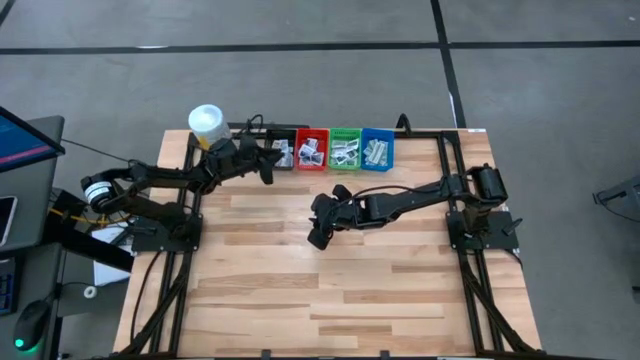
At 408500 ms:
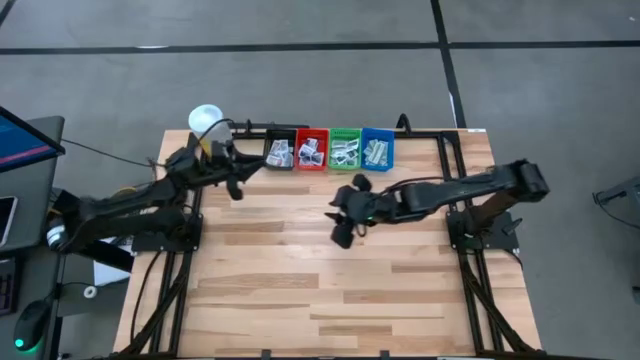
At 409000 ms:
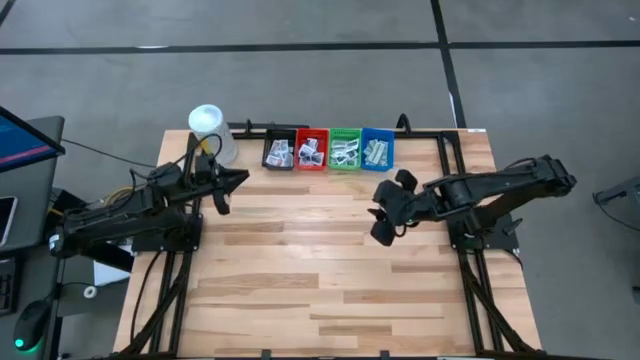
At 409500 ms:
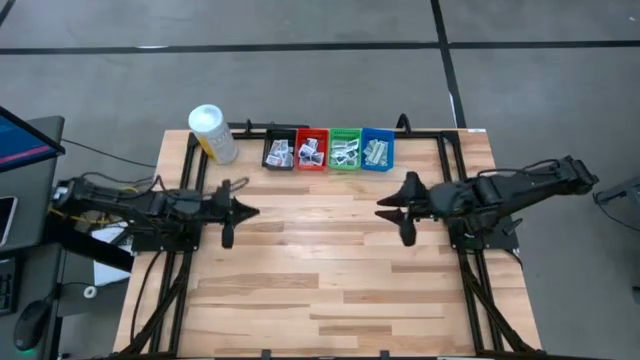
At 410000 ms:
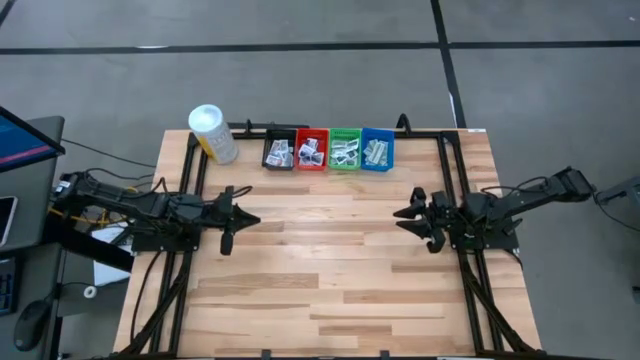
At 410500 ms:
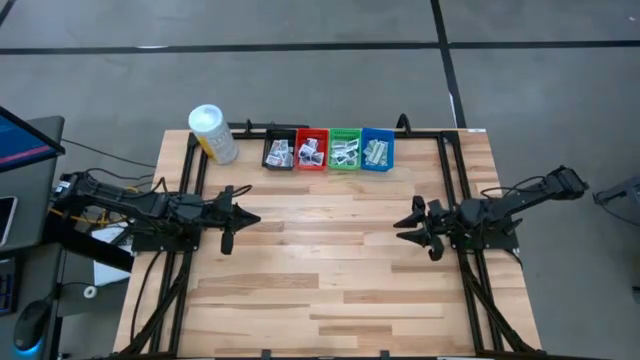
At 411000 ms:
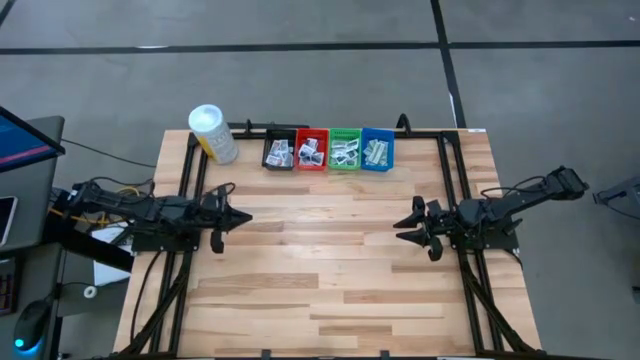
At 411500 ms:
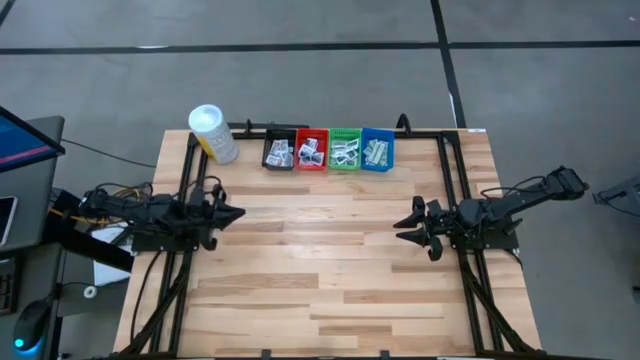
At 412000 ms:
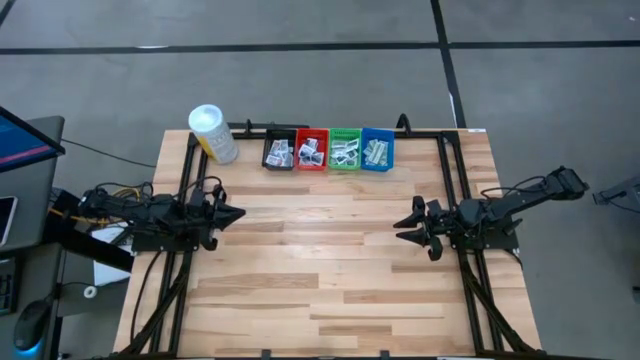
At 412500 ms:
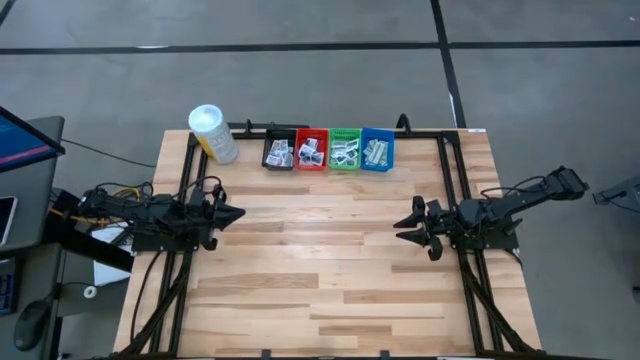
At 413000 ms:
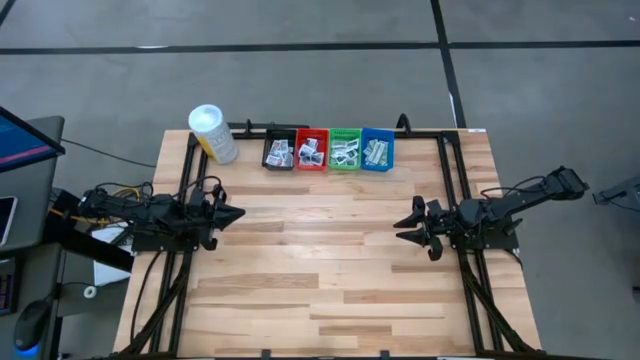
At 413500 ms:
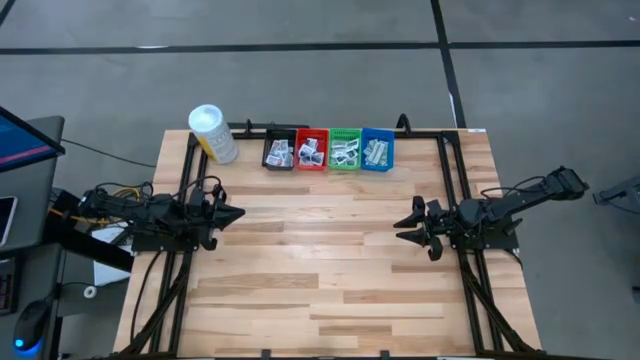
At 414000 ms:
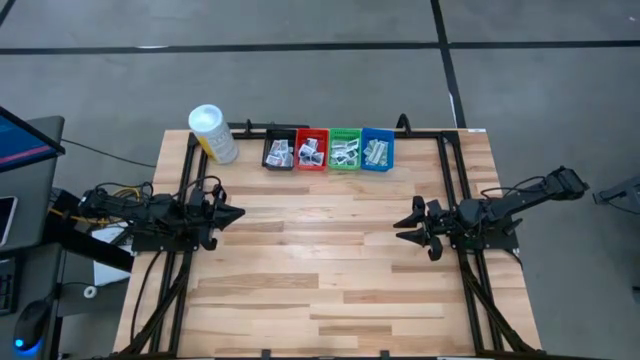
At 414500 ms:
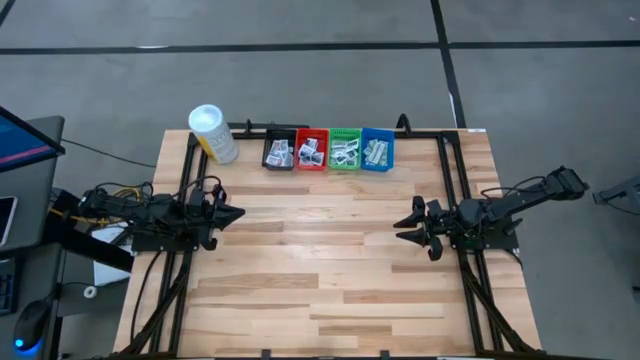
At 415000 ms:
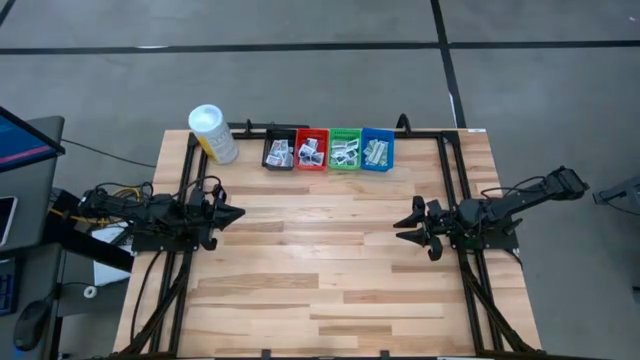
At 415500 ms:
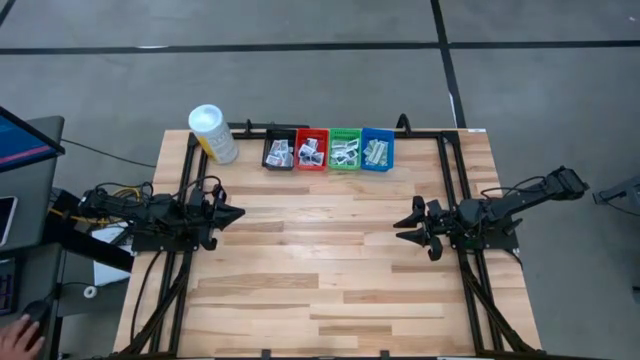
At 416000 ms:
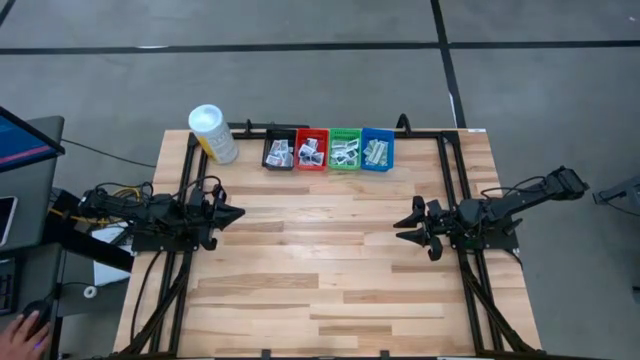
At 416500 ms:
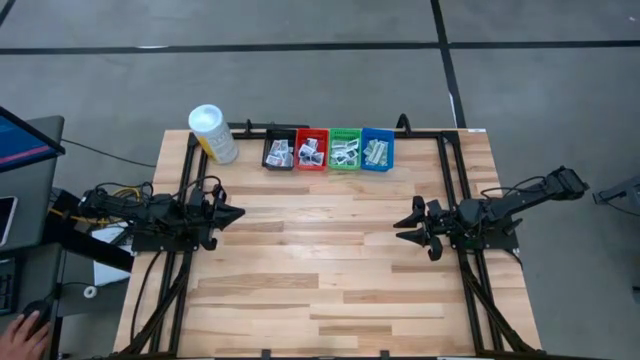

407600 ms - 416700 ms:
Task: Pick & Place First Aid Supplies
Return to Home Position

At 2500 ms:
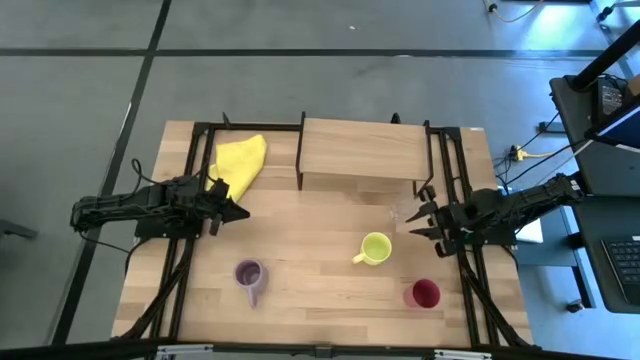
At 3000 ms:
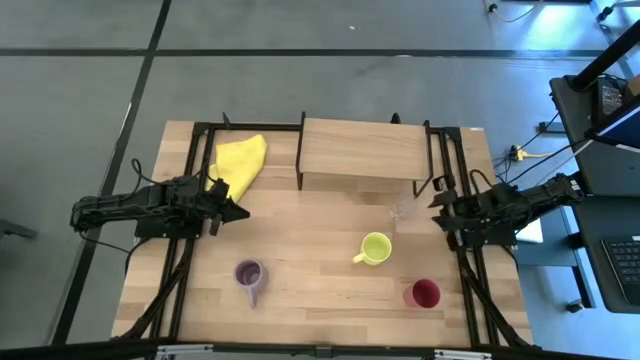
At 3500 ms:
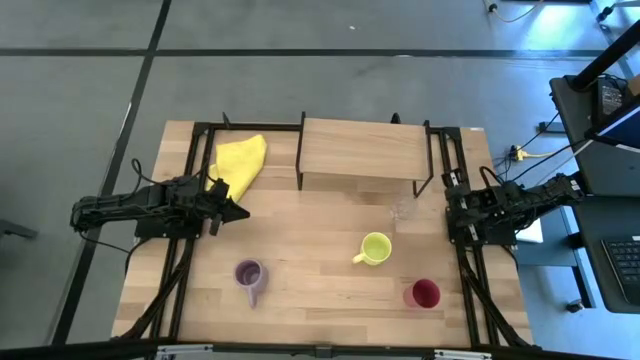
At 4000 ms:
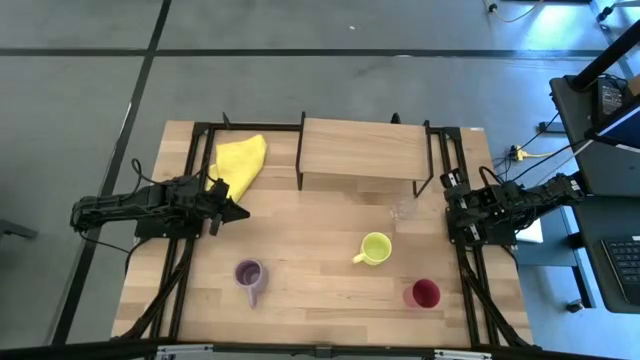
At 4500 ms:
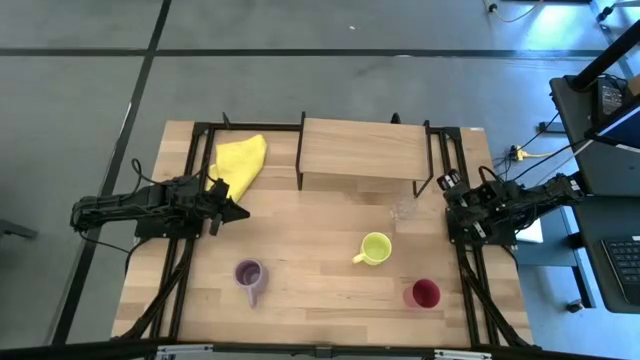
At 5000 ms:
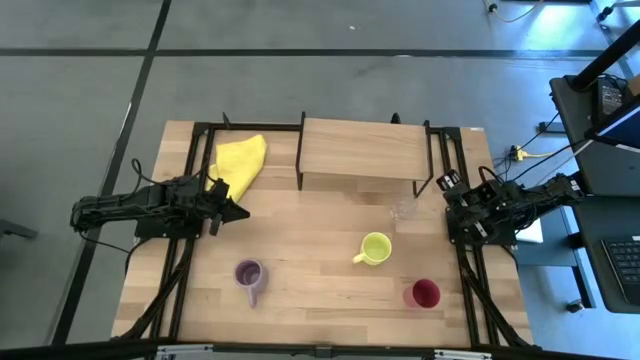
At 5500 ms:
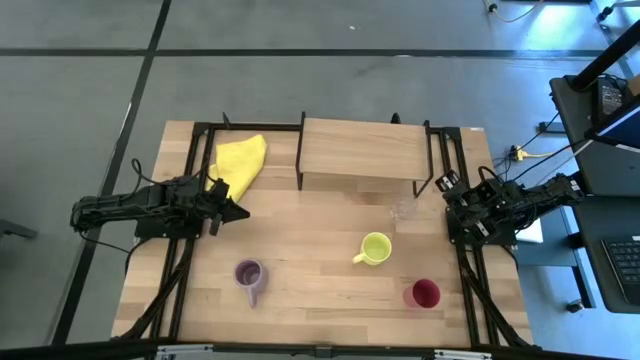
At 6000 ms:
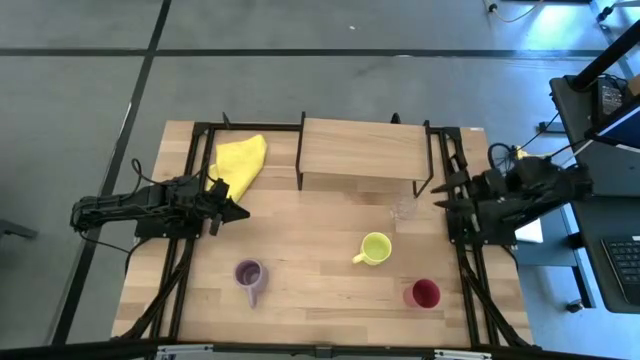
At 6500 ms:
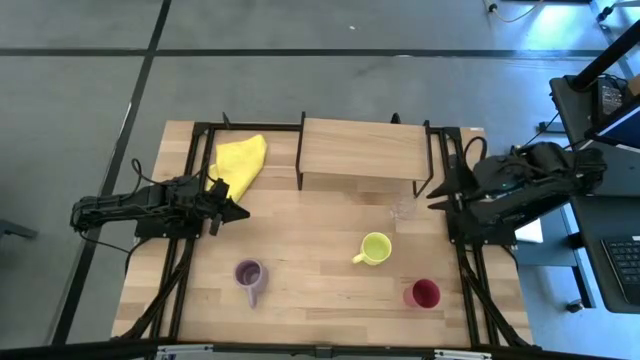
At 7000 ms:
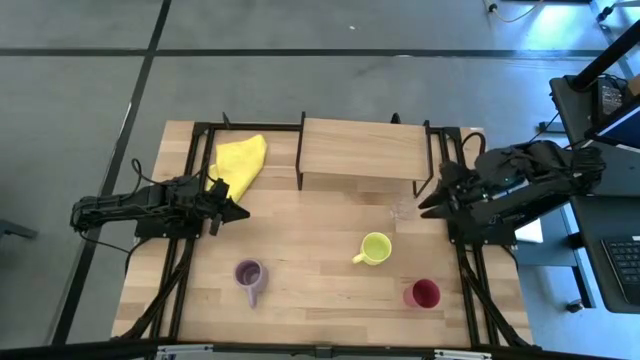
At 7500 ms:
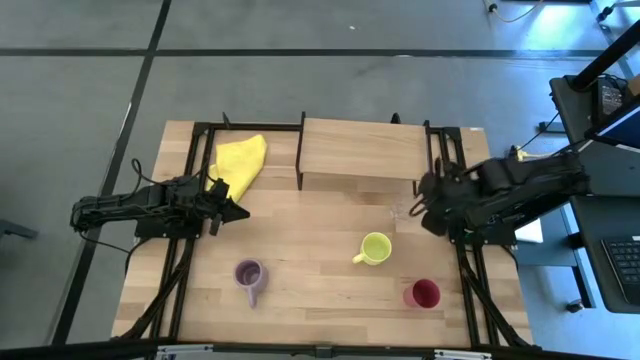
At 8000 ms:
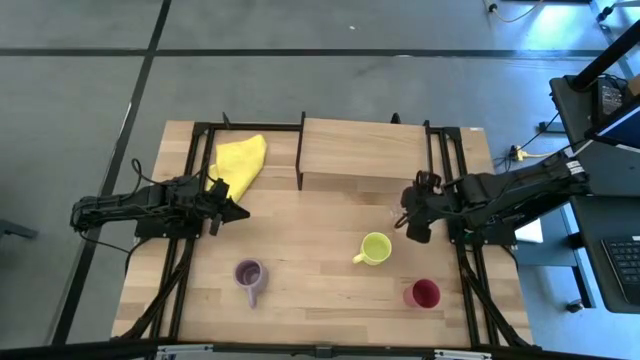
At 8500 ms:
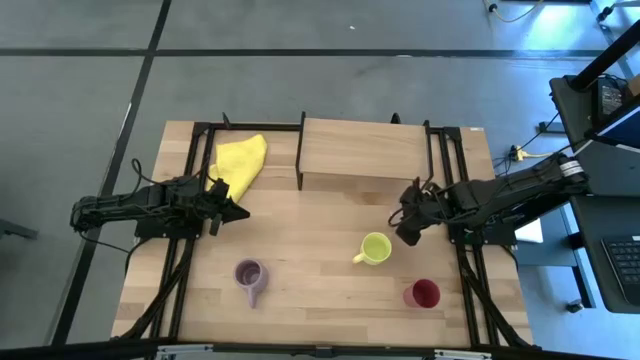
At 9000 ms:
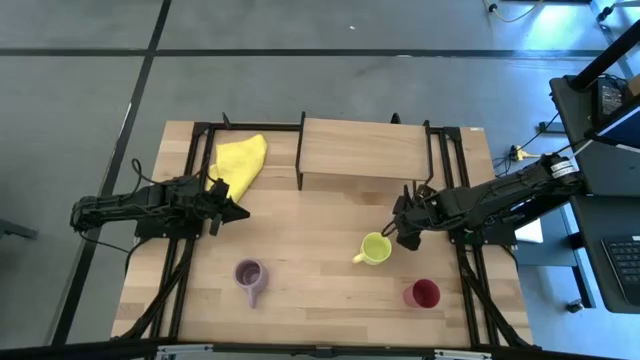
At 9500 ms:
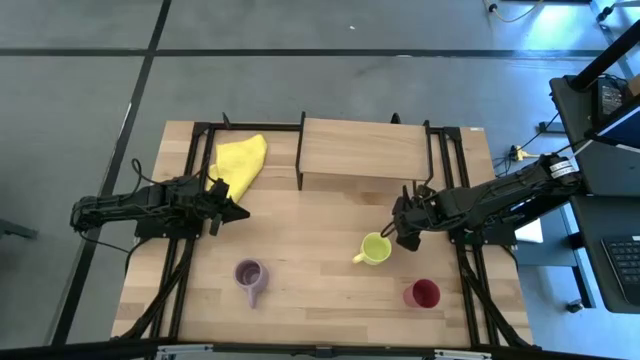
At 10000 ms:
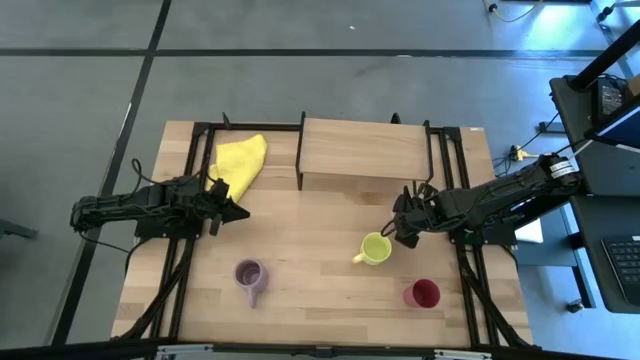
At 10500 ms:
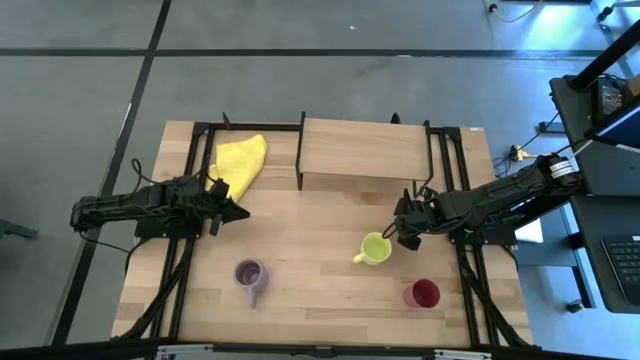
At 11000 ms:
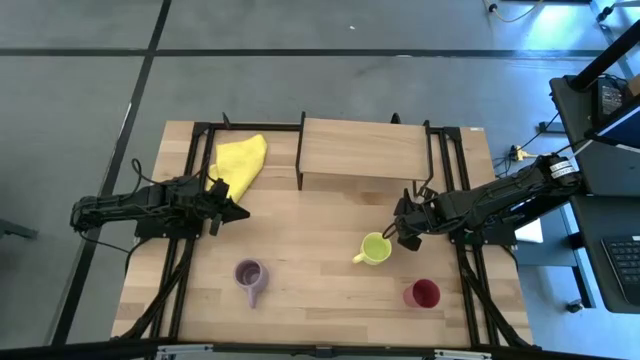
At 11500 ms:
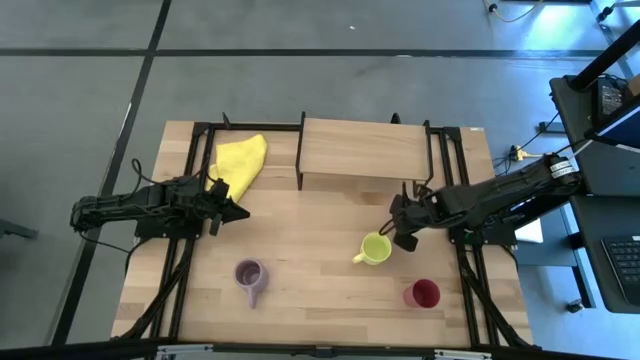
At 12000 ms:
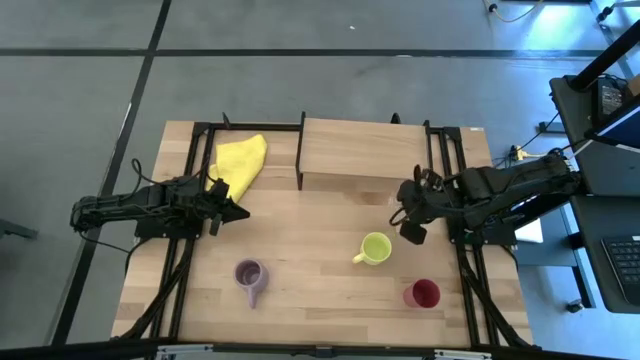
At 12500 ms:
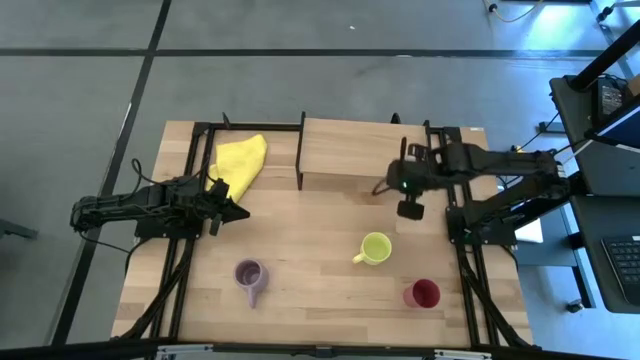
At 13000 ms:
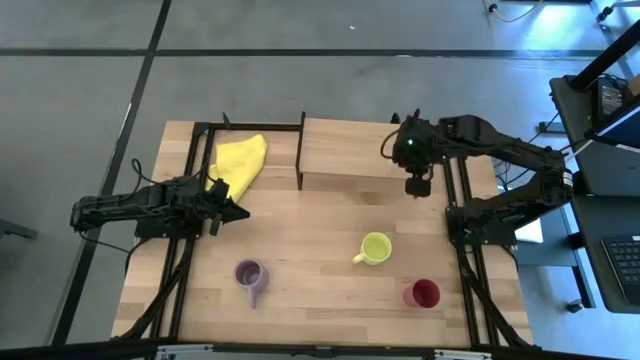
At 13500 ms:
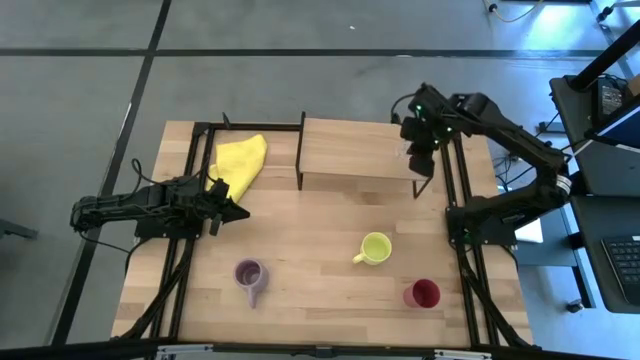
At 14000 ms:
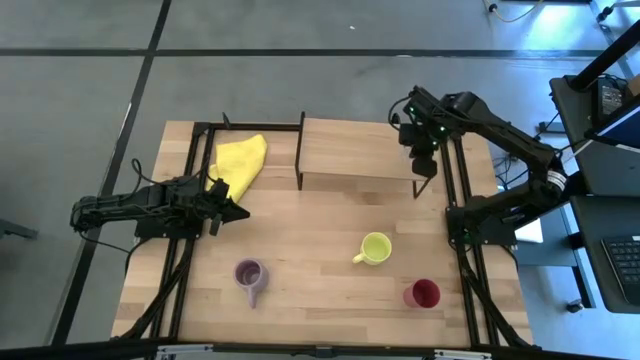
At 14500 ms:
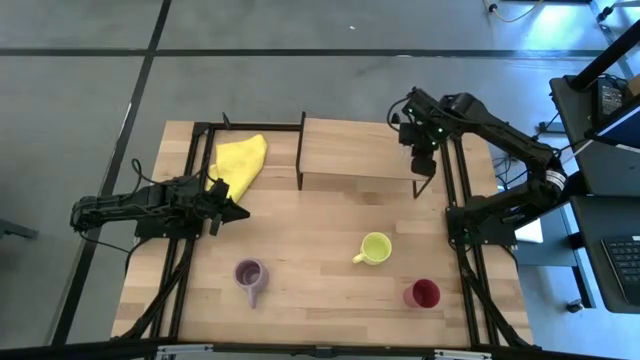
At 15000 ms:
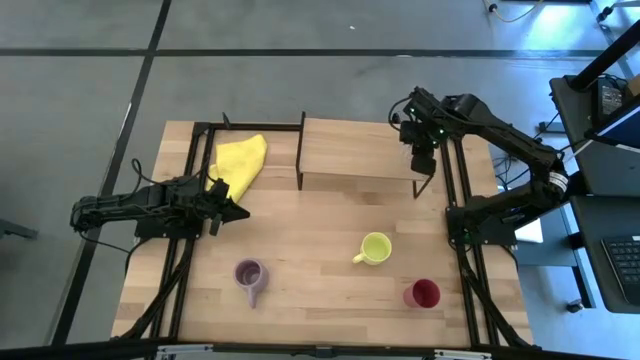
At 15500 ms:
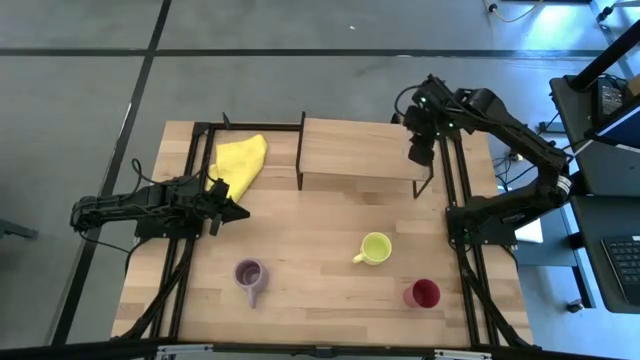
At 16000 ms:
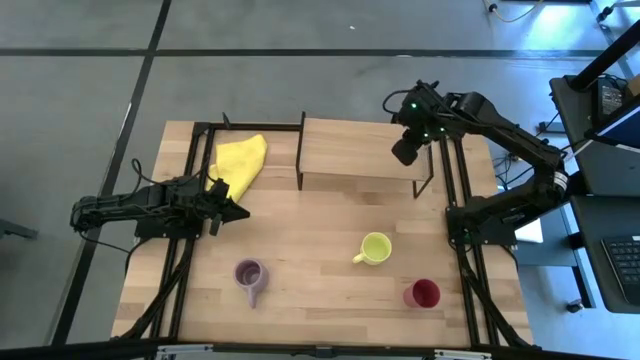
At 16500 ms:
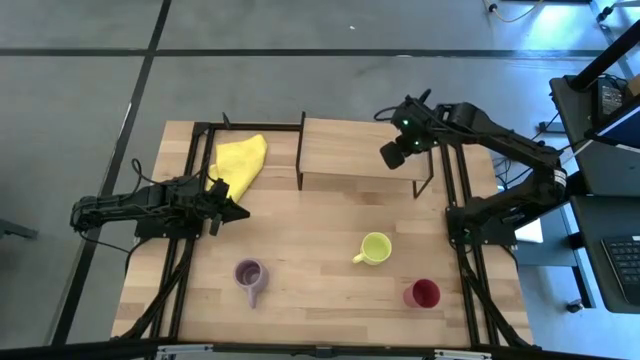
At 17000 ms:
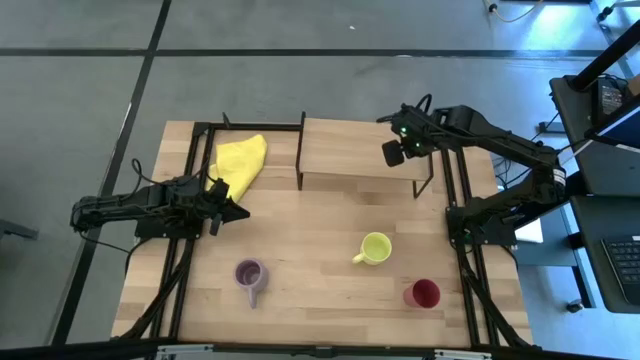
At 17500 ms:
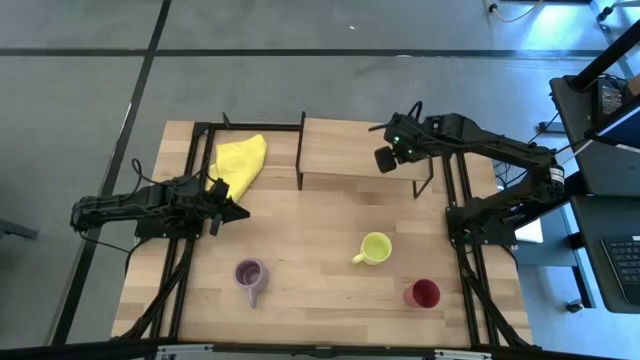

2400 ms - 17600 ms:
Task: Stack small to large cups/mugs on shelf
Put the transparent mug on the shelf
